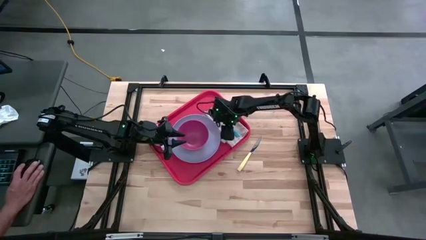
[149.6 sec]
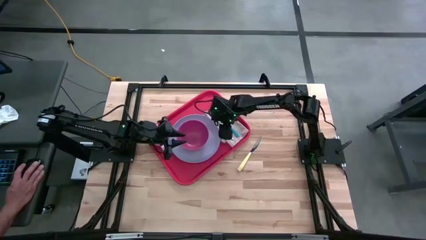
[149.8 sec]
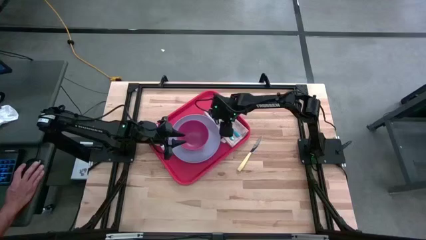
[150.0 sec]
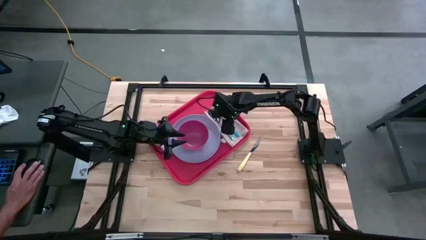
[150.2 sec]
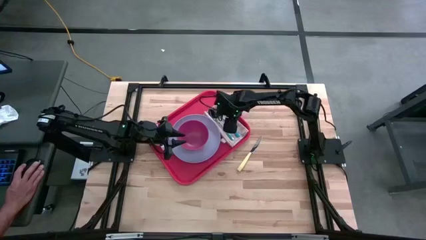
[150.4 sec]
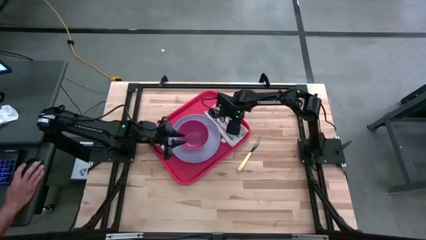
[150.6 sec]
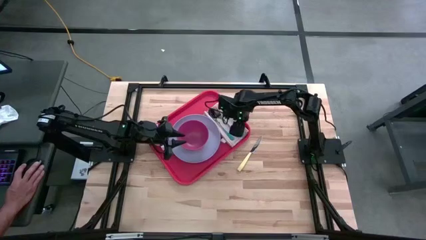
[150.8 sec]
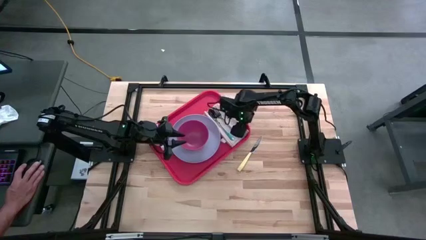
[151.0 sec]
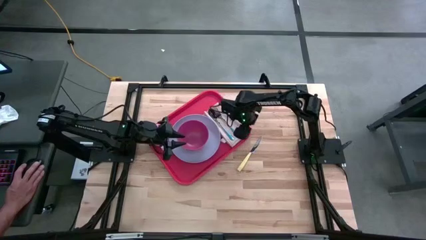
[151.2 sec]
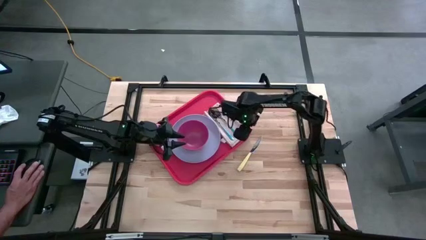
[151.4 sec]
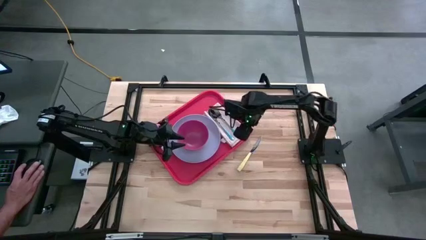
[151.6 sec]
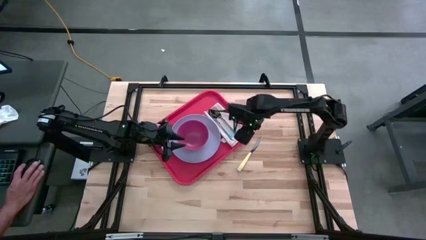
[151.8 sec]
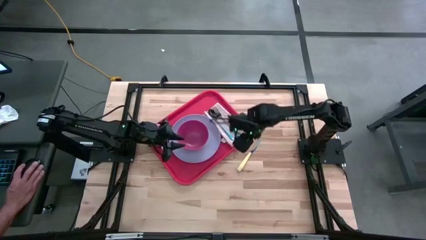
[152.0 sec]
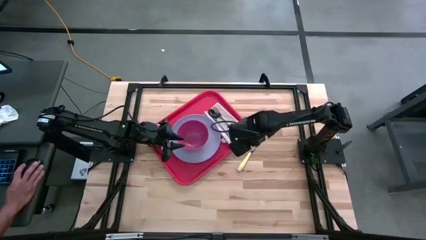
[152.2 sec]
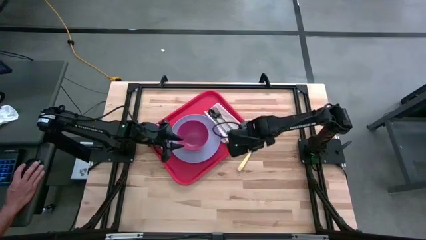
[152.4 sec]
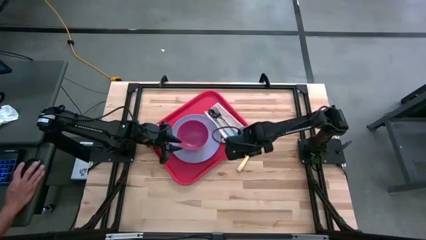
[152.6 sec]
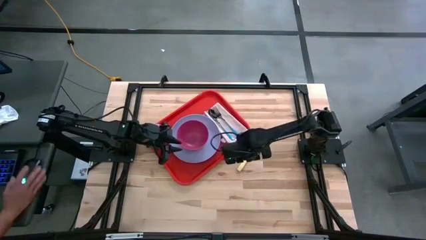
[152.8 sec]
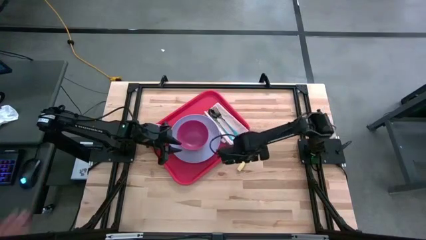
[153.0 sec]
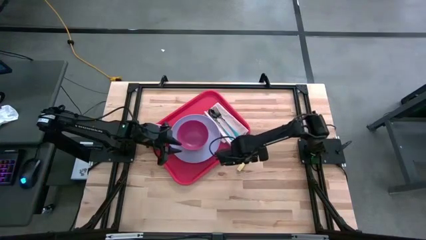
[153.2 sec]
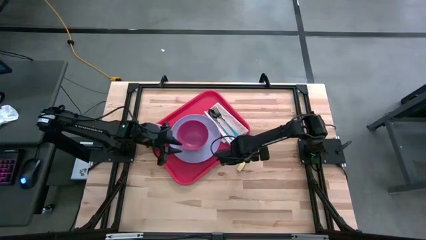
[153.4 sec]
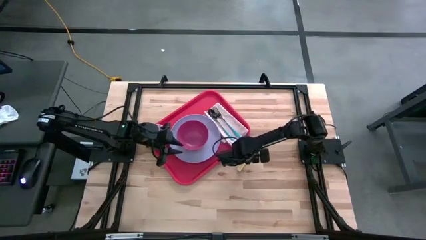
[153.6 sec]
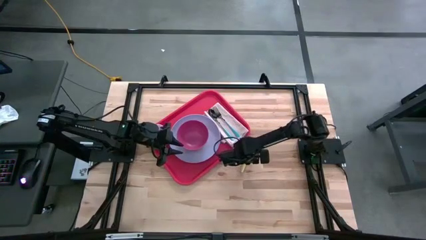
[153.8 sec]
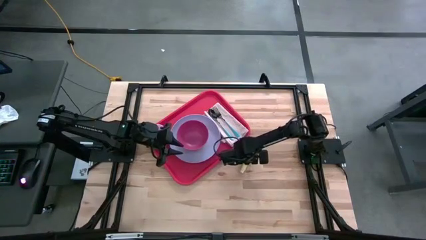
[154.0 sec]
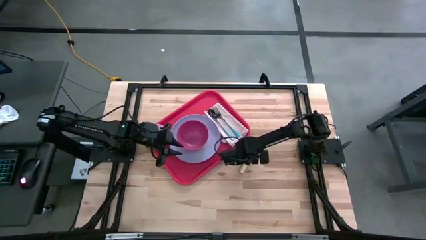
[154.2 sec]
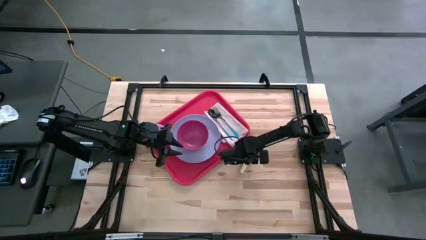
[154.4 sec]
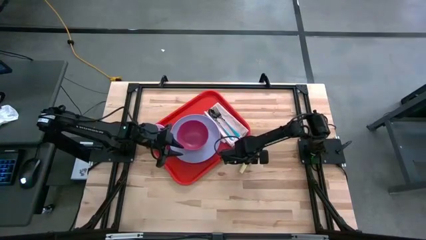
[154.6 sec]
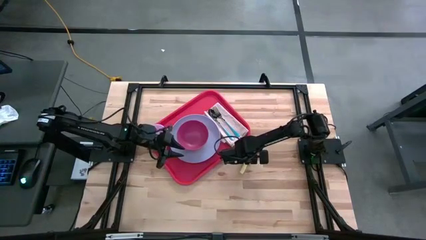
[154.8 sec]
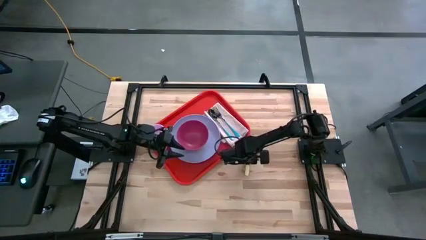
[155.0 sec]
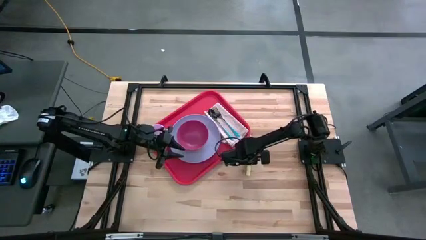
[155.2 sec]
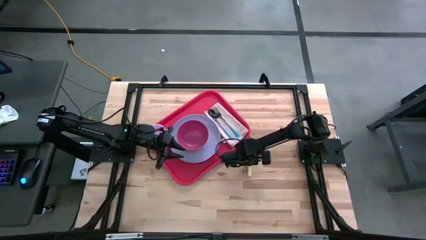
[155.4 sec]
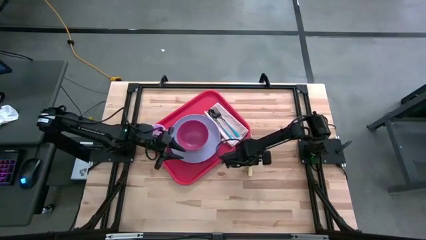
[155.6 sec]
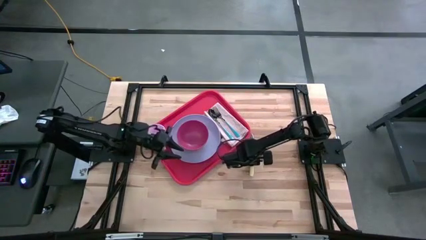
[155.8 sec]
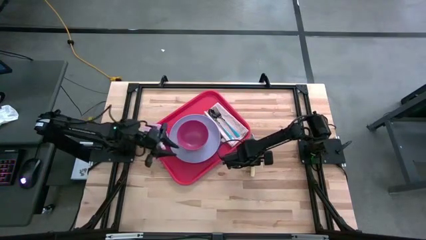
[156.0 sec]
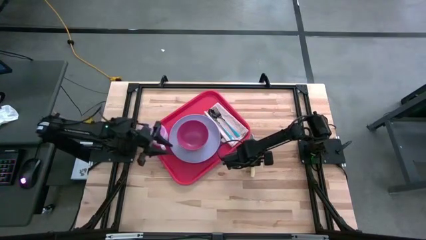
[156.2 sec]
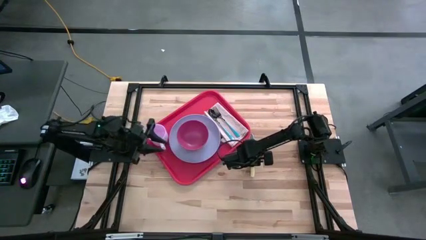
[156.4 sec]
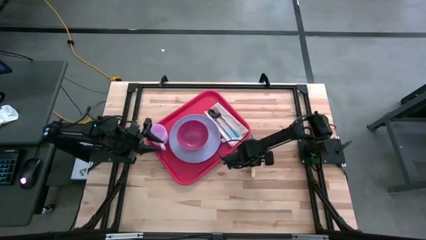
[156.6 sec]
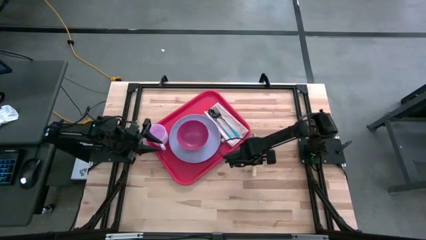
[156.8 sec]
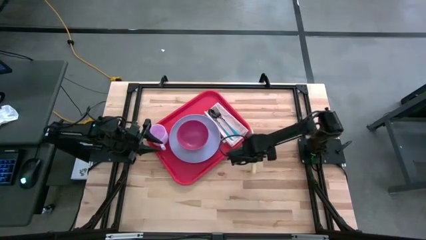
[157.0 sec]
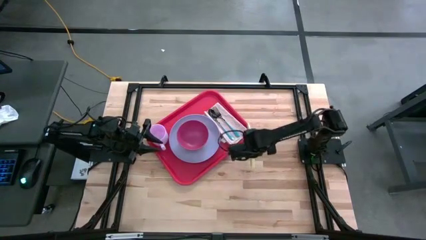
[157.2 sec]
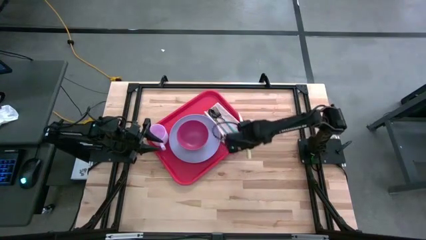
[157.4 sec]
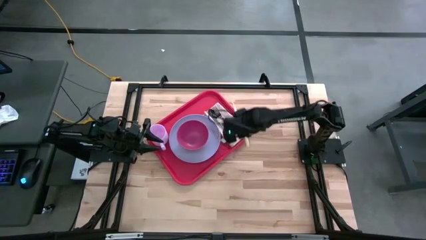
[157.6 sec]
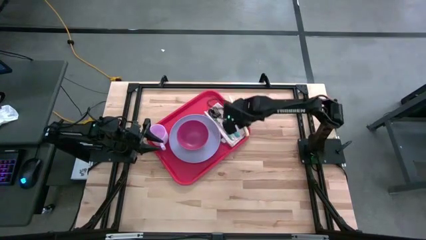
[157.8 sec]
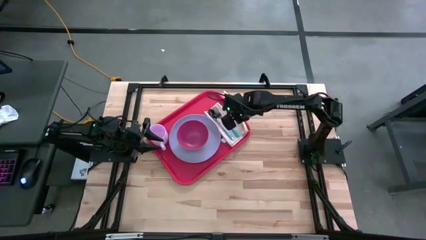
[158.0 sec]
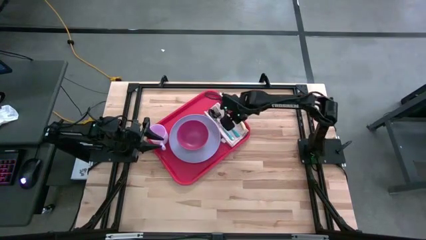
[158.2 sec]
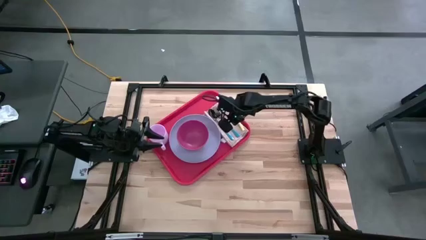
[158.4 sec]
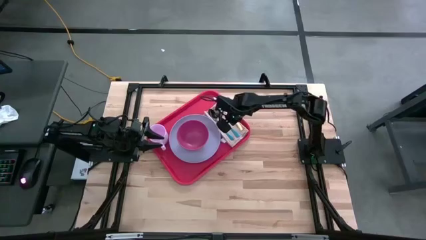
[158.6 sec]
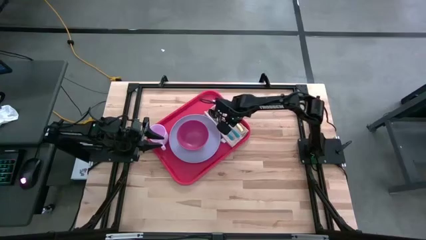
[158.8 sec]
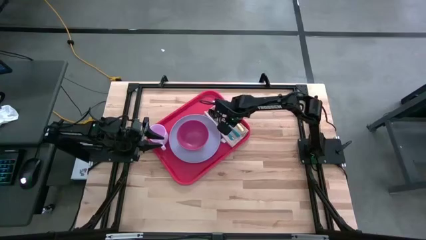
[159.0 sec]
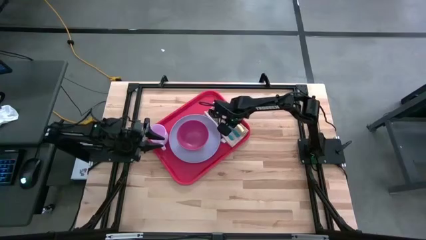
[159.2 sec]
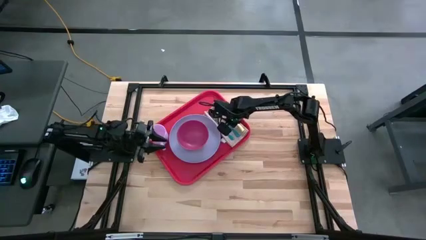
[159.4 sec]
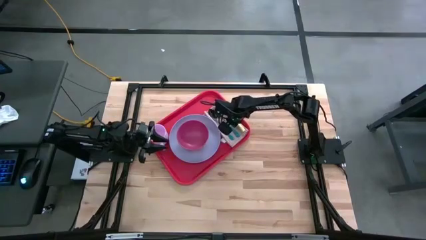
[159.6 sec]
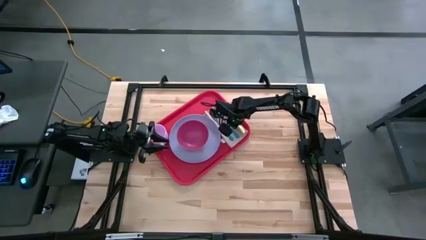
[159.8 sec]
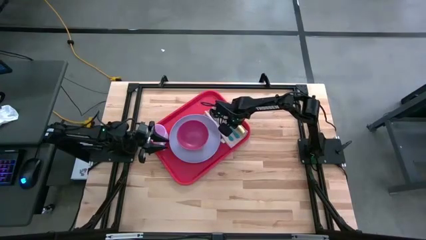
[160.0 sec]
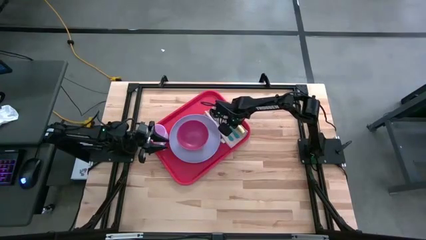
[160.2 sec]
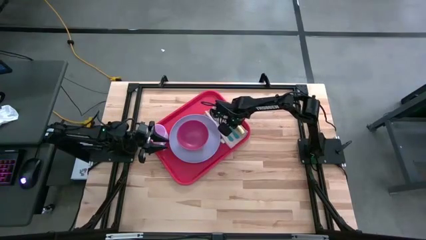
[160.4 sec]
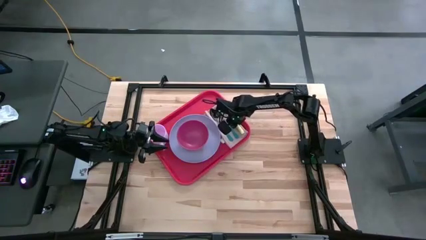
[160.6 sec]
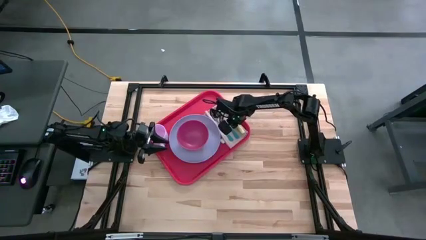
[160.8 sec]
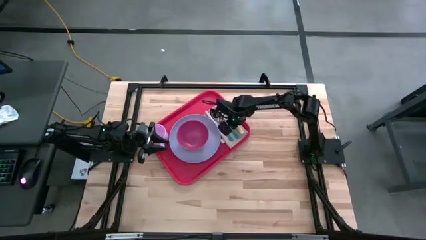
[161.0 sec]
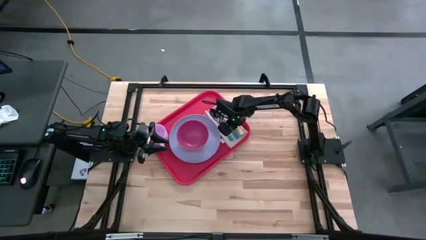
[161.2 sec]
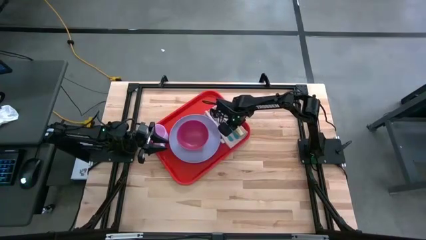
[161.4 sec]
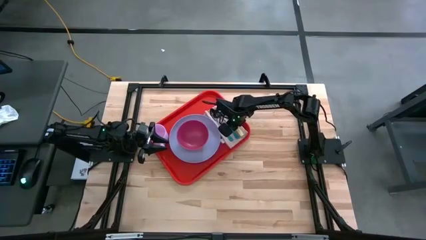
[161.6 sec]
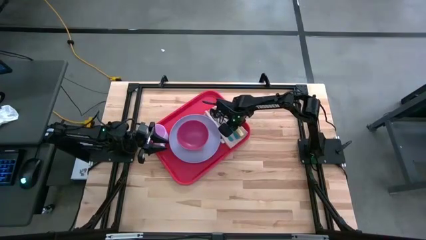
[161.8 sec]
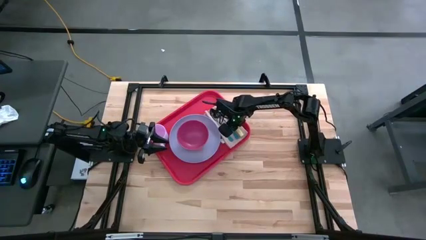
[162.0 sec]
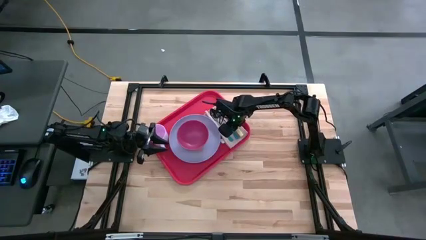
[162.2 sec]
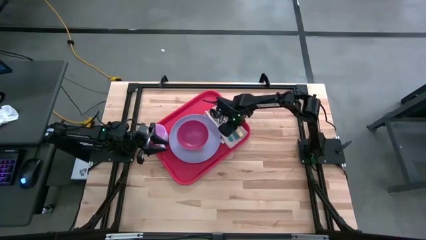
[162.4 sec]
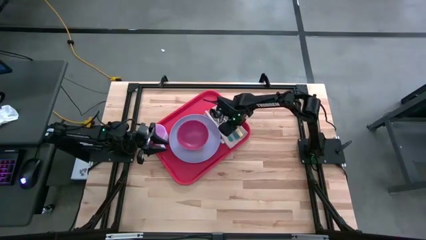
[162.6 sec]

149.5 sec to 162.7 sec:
Task: Set up tray
Put the yellow table knife on top of the brown table napkin to the right of the blue fork on the red serving tray

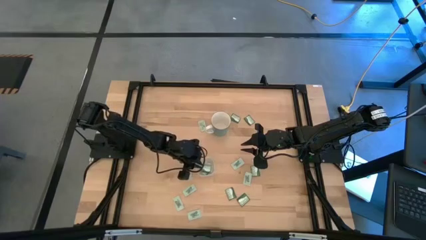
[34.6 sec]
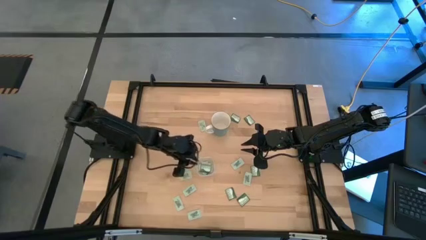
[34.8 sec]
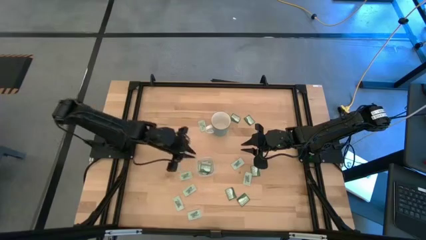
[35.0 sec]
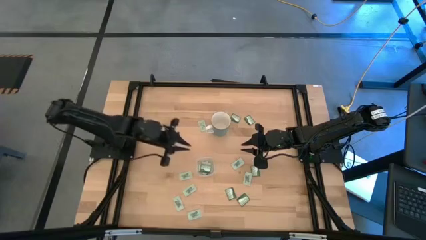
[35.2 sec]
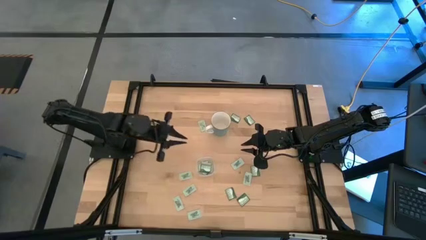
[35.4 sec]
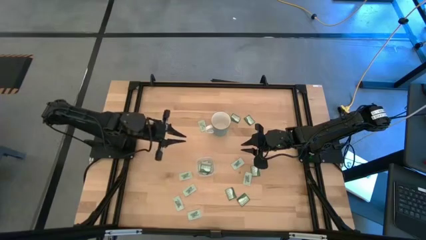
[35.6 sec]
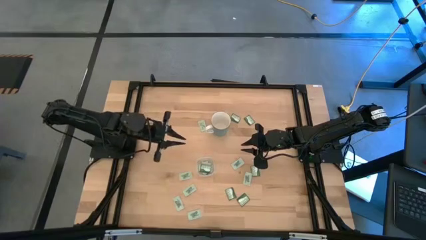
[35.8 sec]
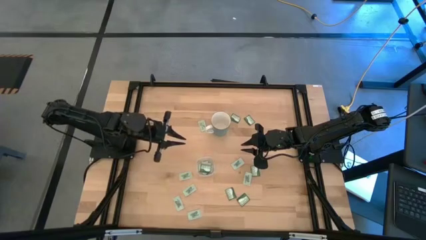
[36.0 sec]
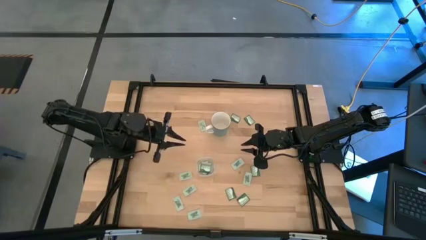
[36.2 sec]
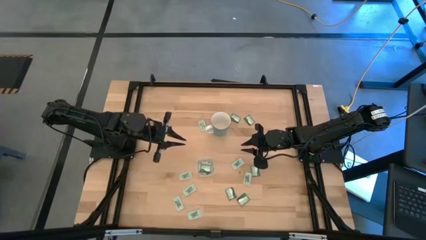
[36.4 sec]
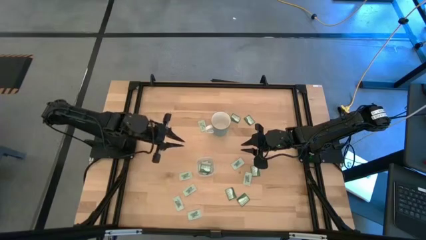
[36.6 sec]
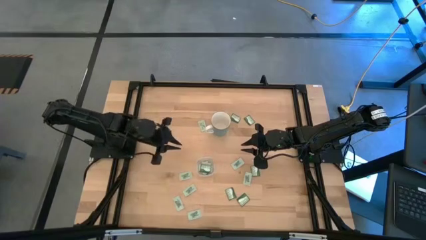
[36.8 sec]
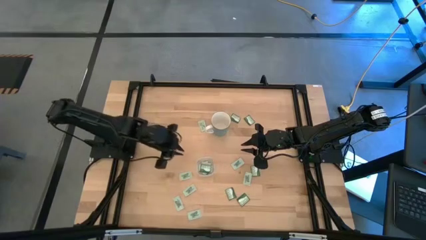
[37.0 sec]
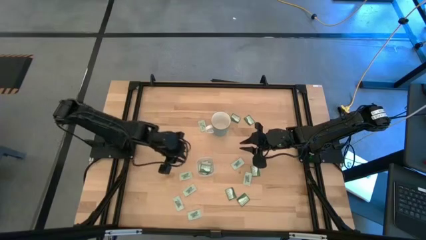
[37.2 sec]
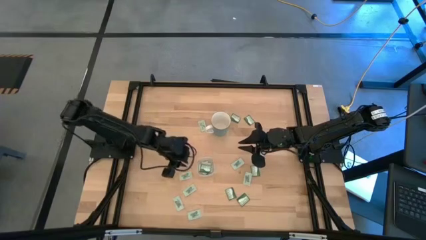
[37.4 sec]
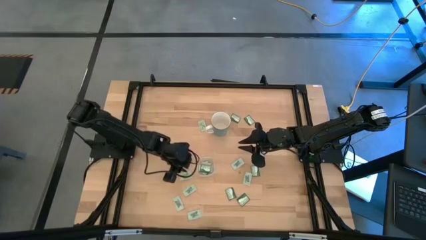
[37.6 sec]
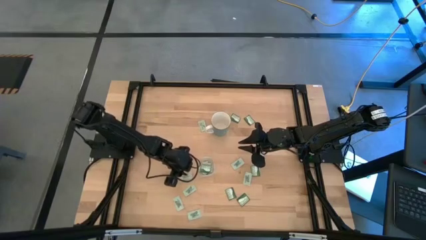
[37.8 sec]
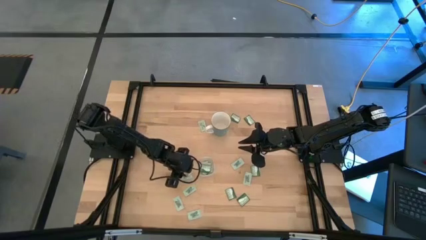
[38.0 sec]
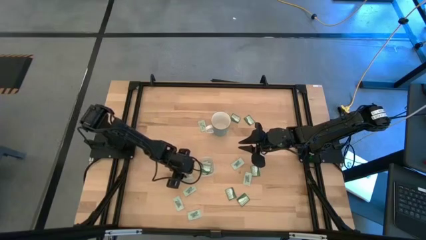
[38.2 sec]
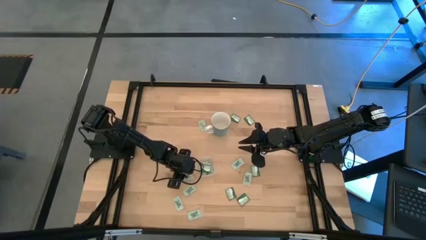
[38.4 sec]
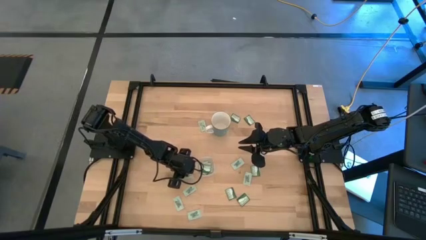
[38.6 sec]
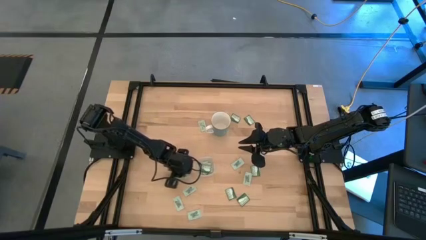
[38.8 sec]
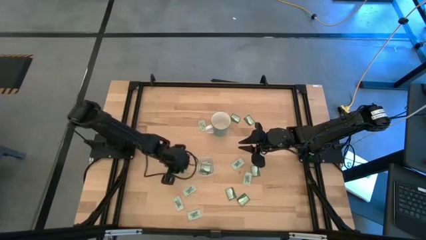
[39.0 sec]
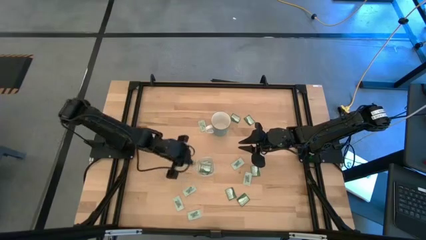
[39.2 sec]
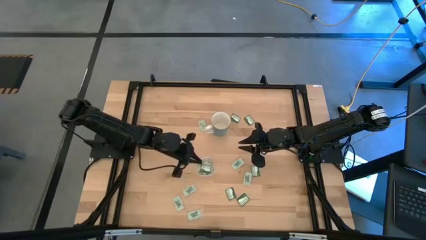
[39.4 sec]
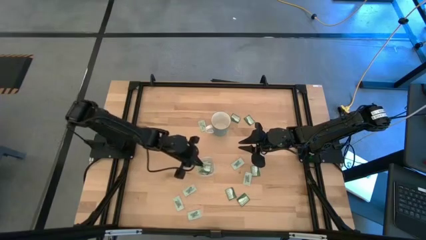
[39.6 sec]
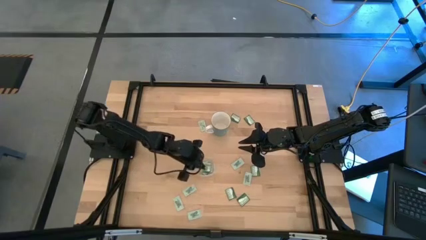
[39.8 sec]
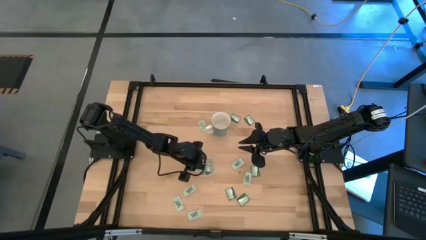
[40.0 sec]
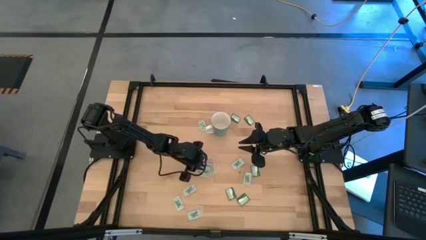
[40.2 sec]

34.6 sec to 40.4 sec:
Task: Pick and place Stevia / Truvia into bins
Put the white stevia packet into the transparent bin
